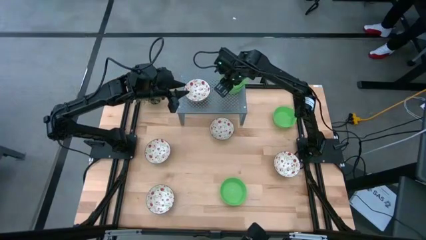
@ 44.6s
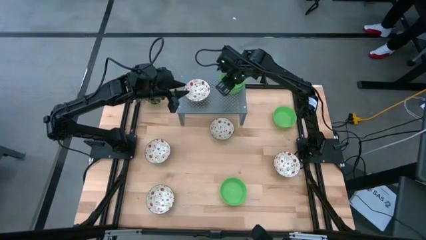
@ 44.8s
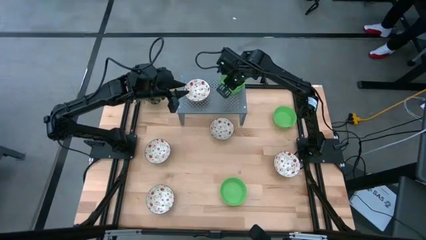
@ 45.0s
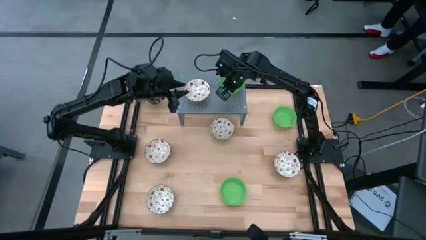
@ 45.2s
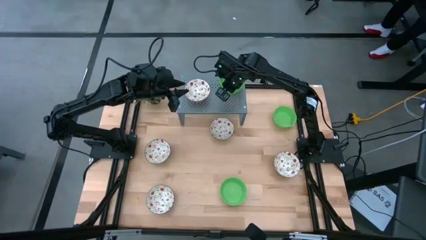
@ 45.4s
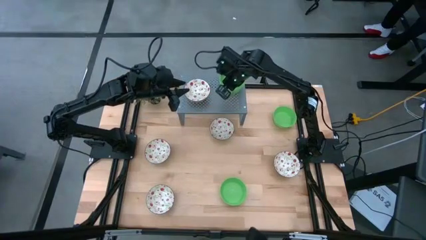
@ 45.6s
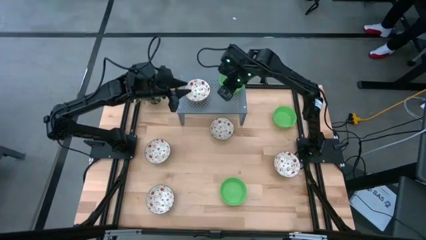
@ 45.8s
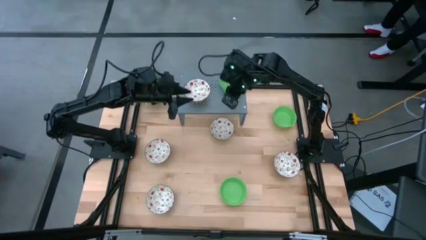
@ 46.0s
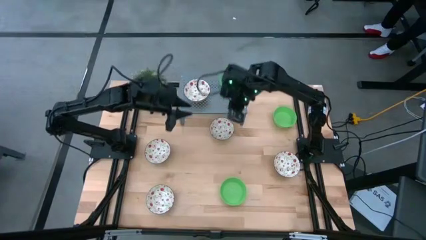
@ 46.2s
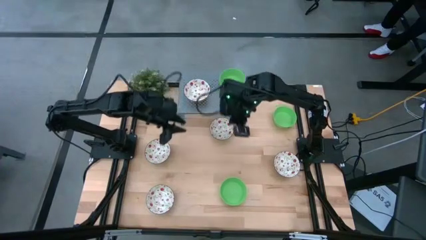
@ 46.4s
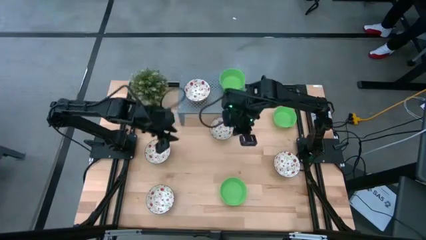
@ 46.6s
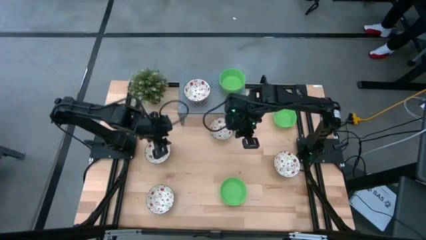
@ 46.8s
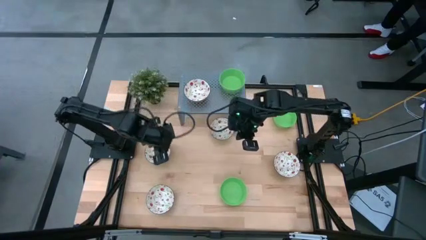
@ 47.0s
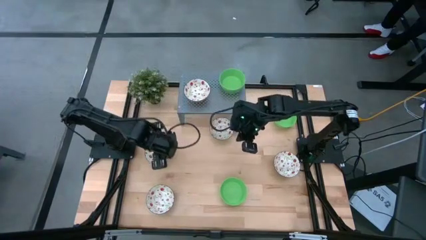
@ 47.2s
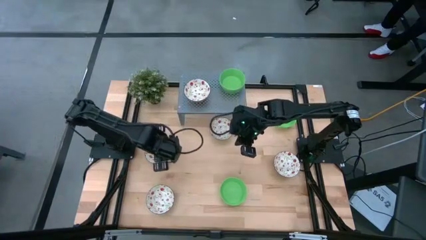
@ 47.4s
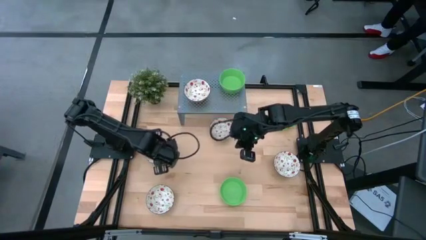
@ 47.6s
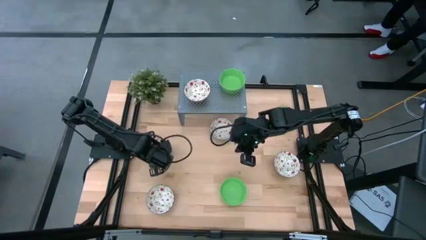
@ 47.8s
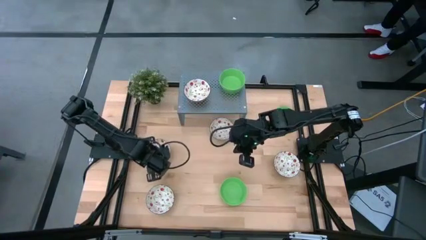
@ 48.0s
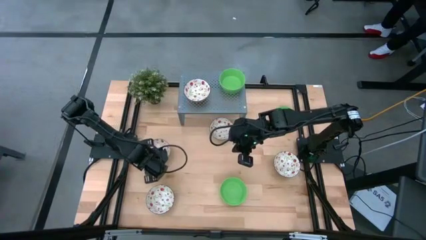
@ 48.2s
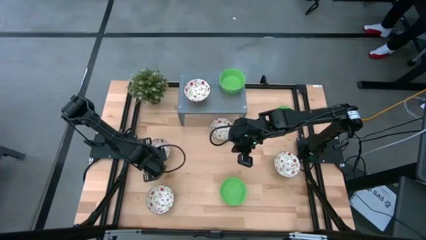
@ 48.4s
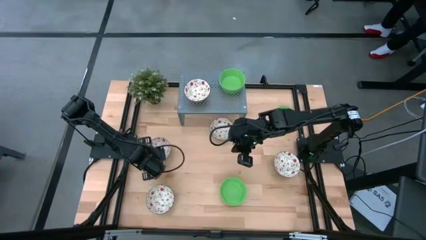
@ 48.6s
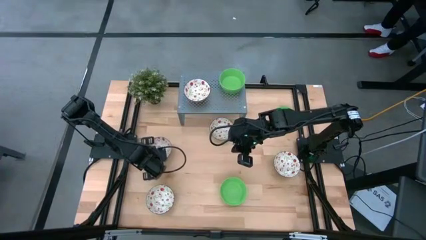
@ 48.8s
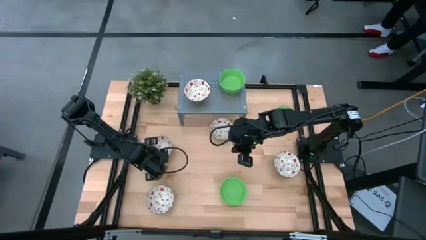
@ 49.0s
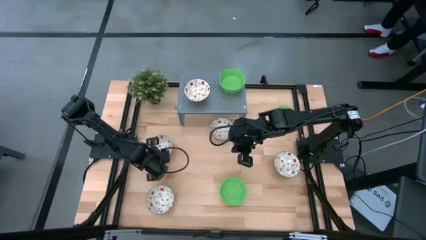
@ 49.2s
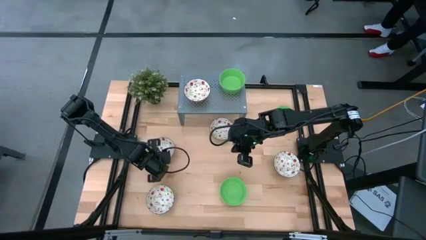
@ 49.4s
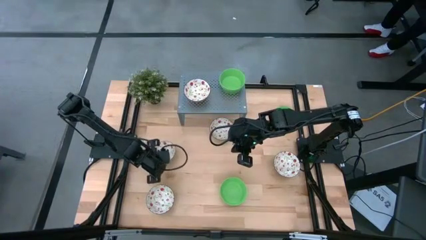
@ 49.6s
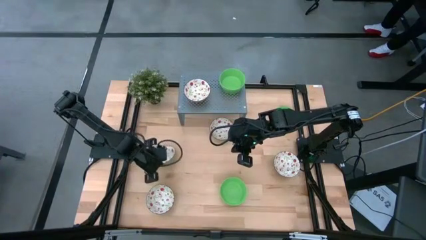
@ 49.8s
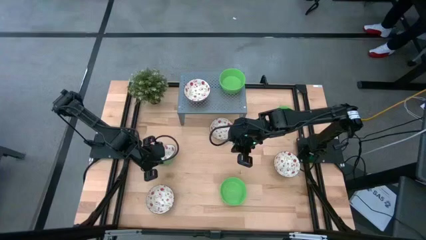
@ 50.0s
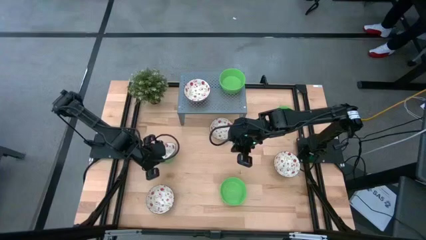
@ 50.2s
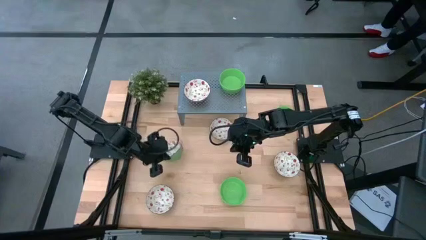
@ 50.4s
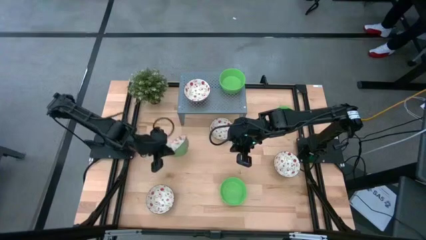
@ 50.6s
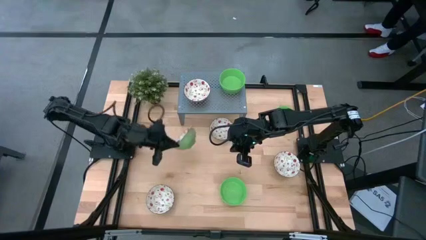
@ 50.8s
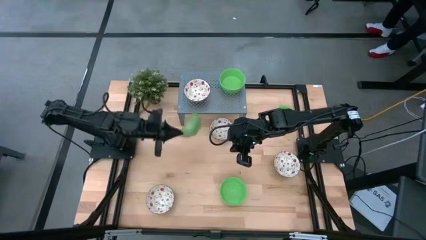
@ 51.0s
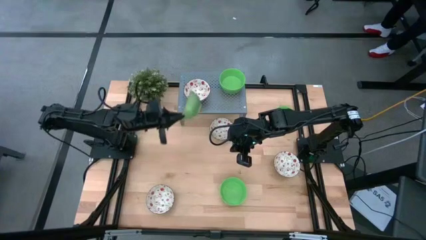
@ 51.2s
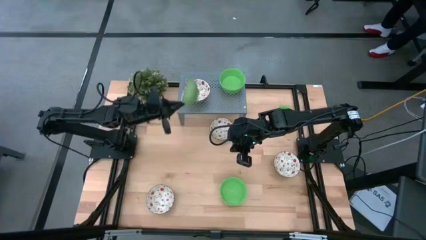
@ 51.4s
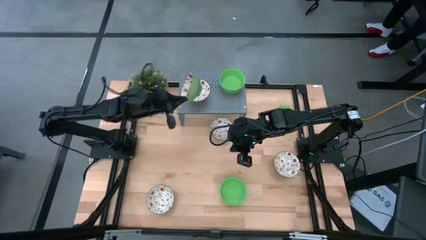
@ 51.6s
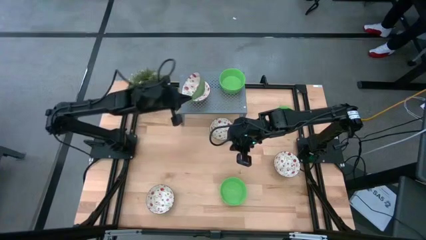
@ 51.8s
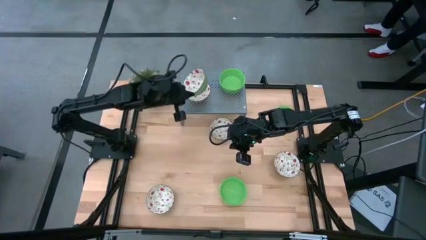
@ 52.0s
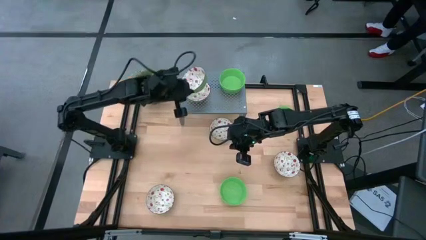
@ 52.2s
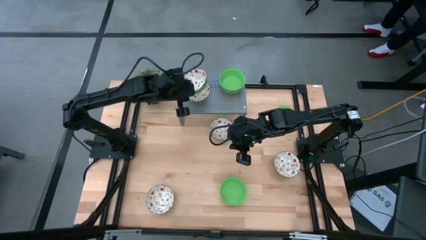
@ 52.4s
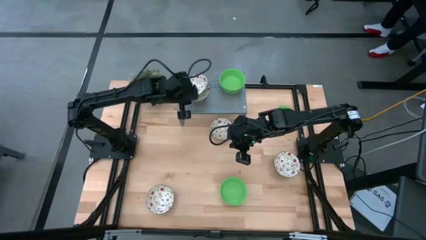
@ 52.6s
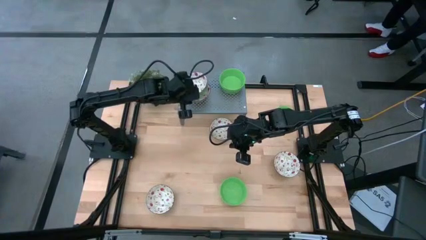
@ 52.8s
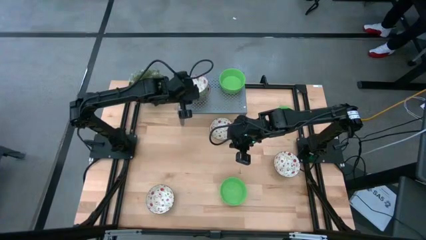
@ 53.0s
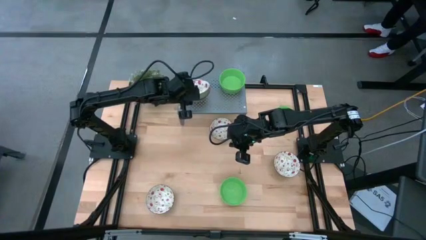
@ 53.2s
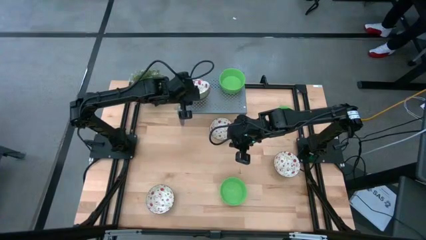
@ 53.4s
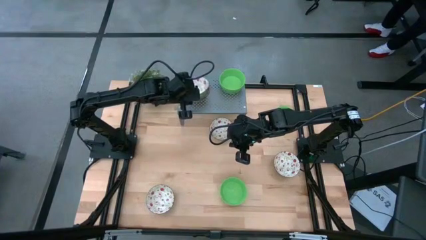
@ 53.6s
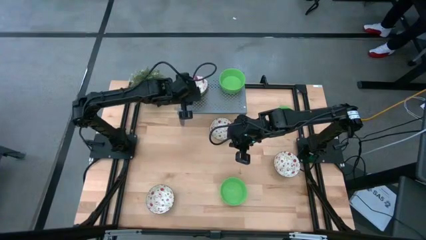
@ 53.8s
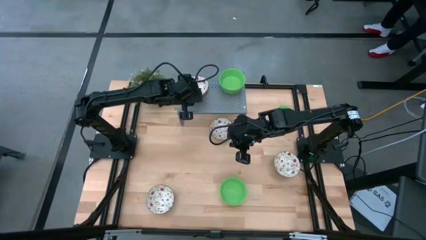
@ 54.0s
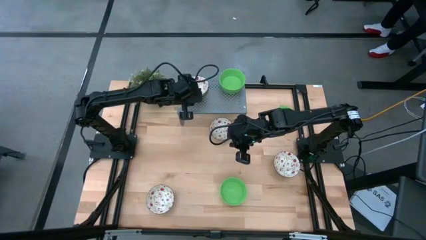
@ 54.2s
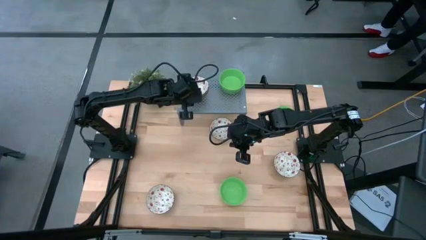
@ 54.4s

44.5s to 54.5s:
Task: Pick & Place Mini bowls
Stack the green patterned bowl on the green patterned bowl

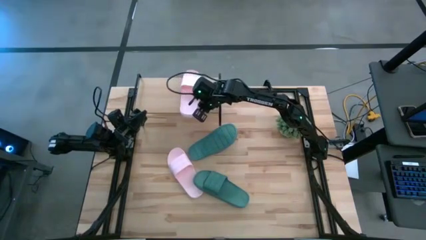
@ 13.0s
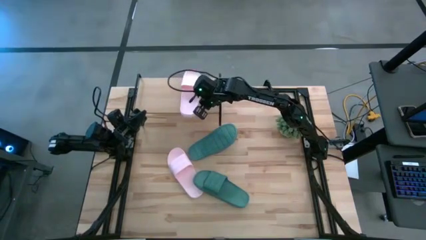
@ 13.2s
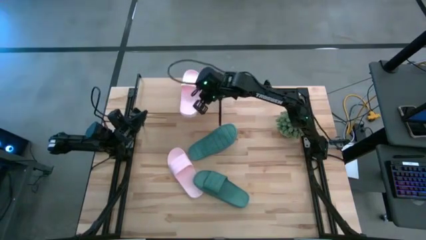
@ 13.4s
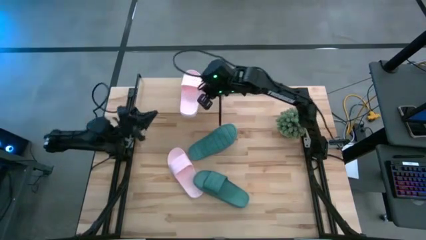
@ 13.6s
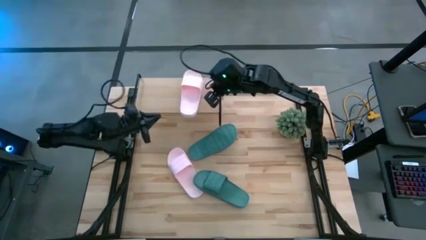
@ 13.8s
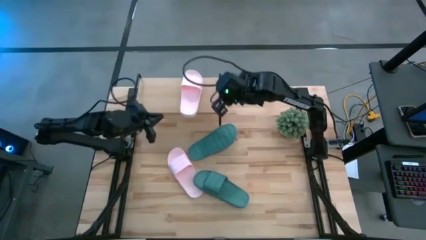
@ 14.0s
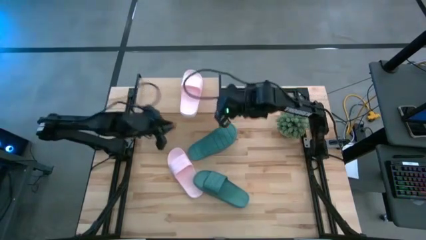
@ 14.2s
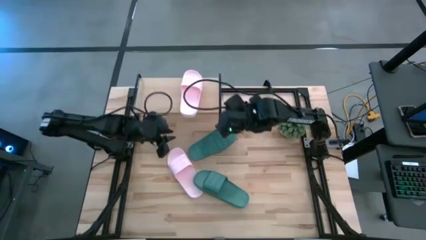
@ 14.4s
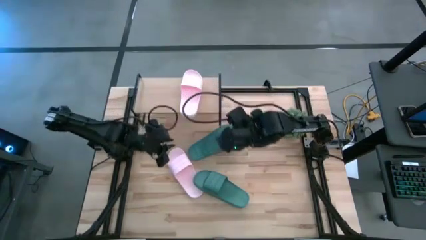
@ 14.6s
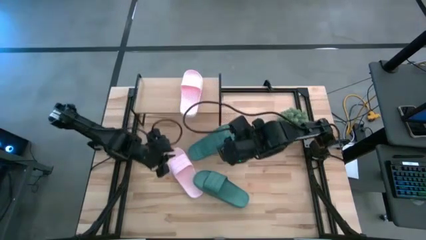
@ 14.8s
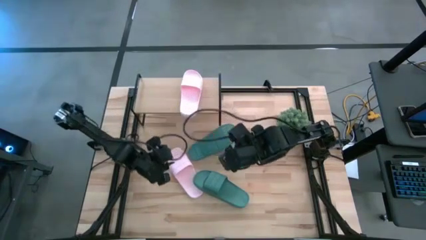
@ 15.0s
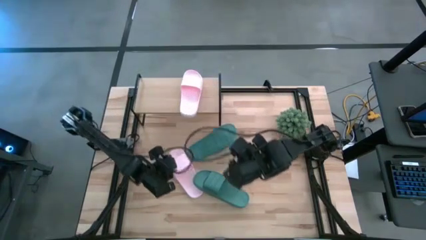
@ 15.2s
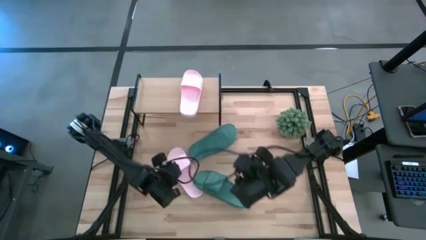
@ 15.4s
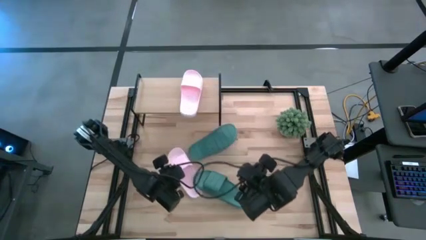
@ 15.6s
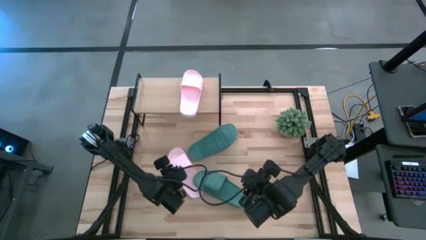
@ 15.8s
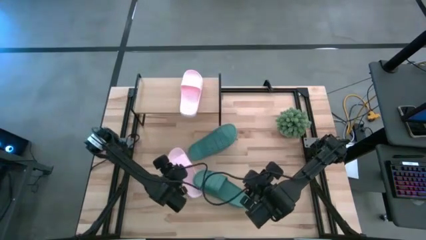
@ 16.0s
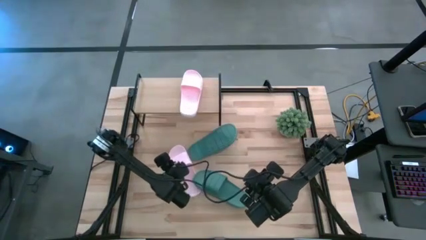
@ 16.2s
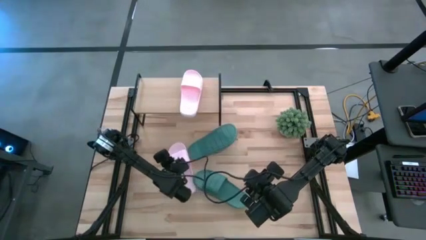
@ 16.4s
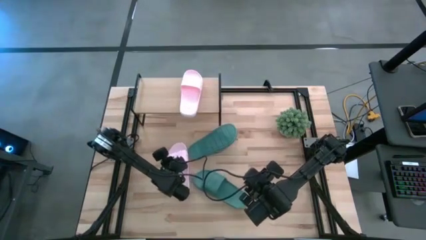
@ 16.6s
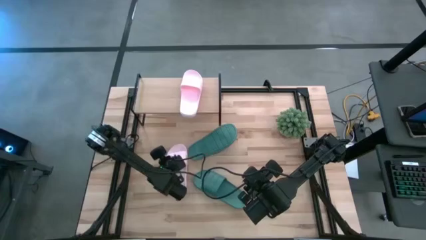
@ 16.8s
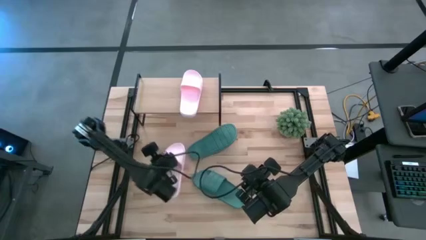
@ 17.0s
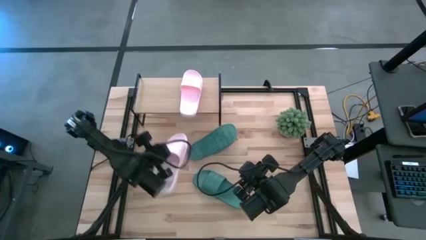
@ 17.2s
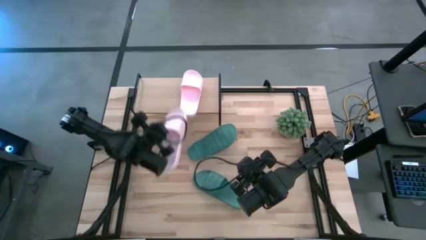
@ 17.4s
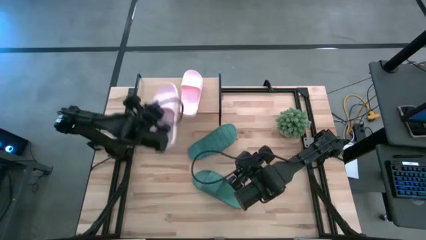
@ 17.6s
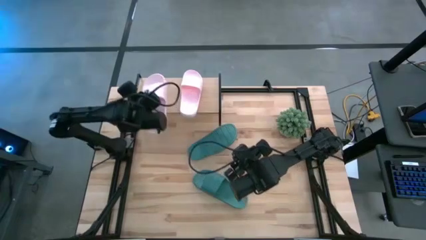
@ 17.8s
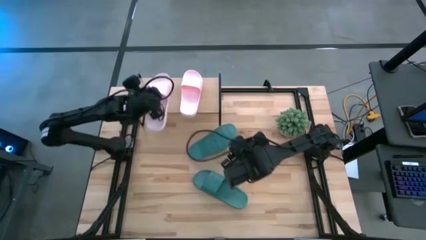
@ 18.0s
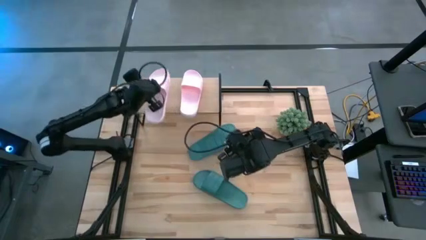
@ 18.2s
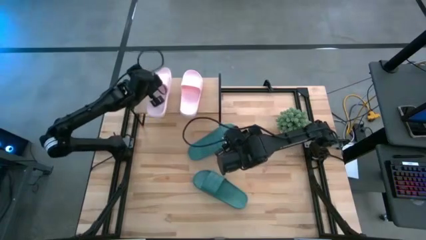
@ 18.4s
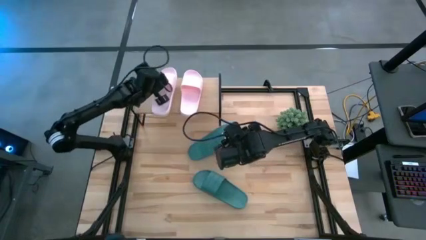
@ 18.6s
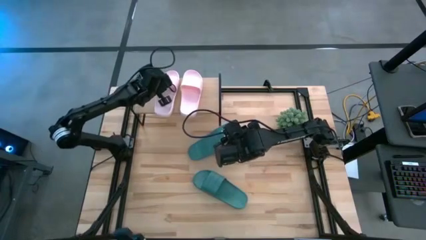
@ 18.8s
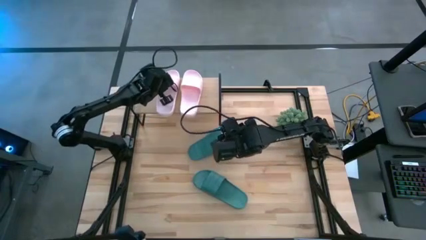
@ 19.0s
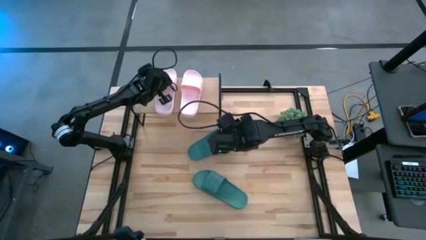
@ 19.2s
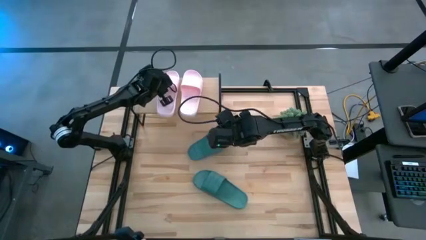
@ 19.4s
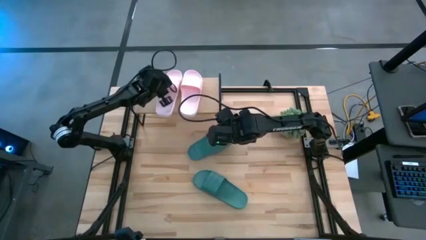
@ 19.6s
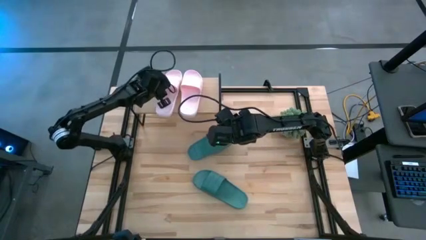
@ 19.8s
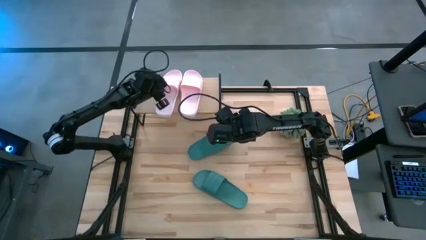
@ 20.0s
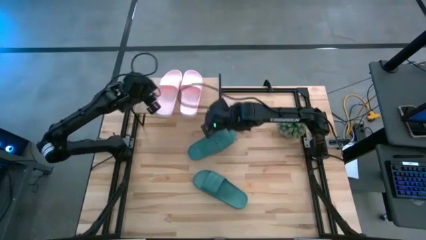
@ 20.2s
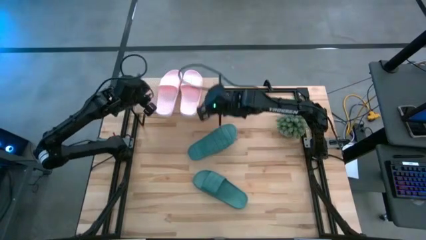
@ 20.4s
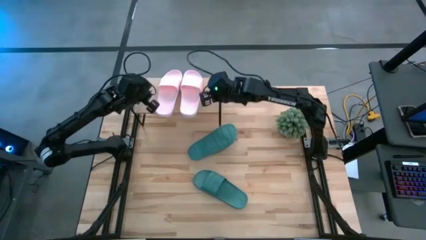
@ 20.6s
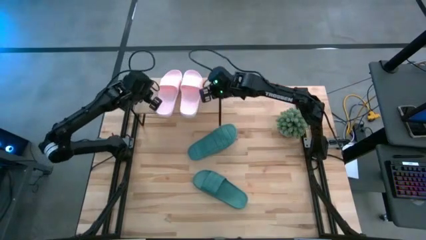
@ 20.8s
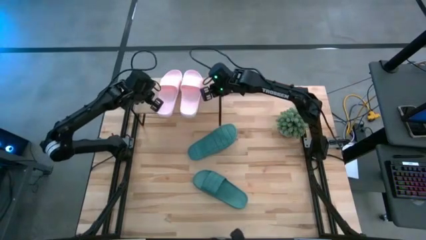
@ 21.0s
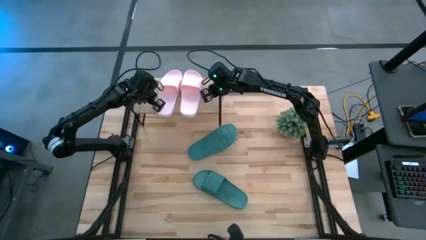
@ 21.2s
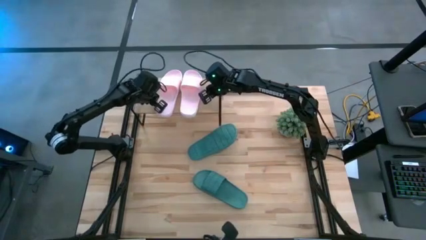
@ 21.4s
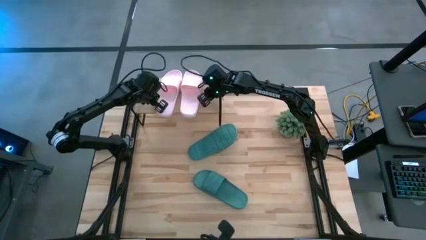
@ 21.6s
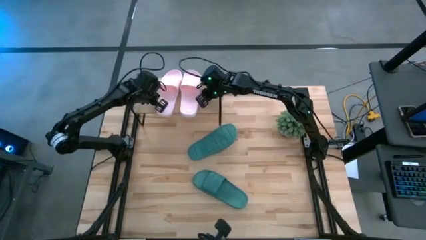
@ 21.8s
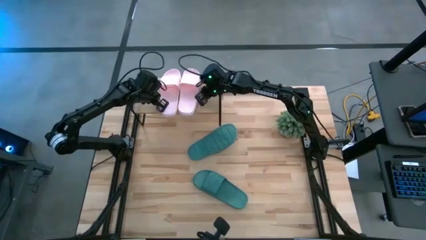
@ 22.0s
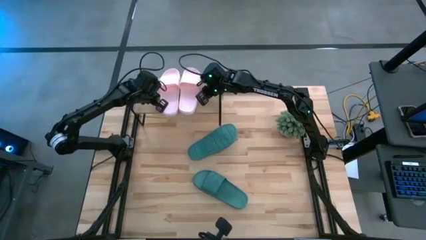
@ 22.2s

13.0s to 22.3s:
Task: Pick and place slides into the shelf
Put the pink slipper on the shelf
